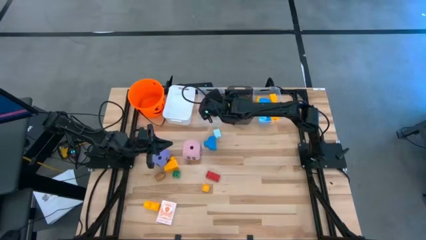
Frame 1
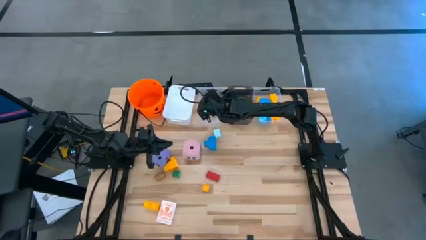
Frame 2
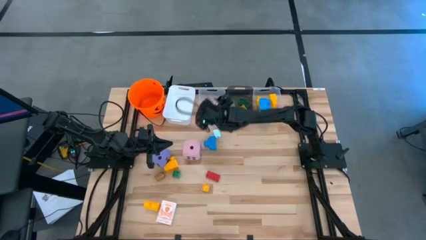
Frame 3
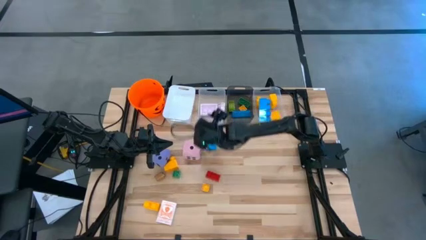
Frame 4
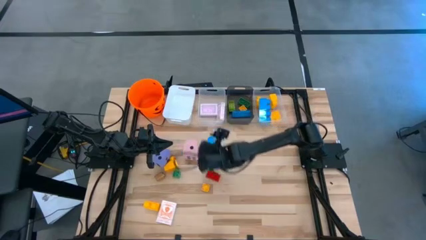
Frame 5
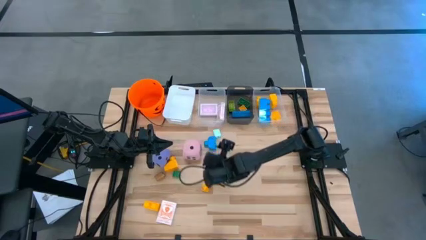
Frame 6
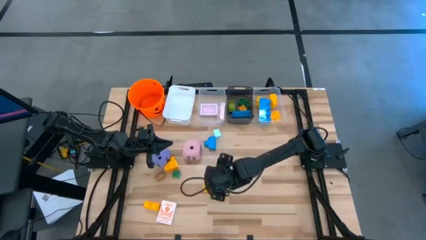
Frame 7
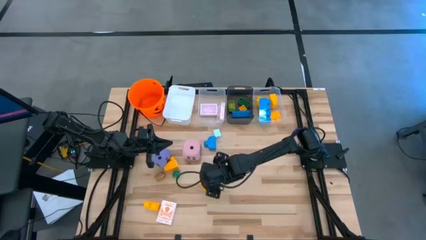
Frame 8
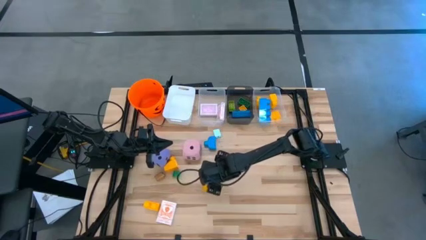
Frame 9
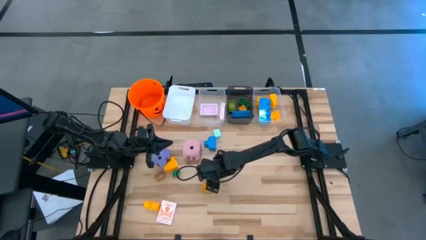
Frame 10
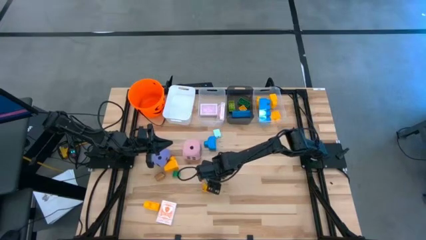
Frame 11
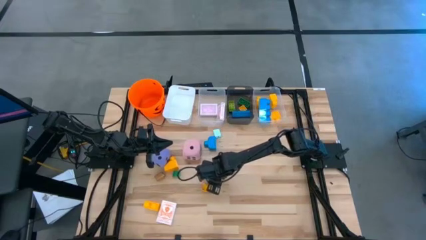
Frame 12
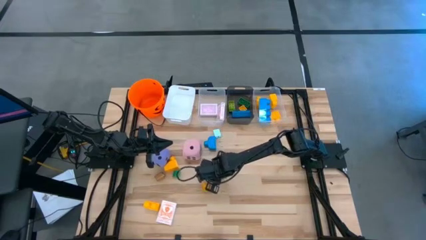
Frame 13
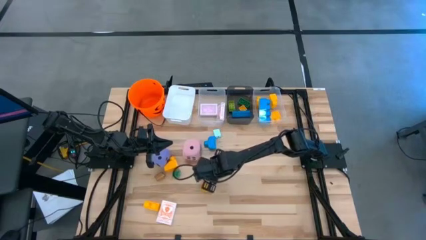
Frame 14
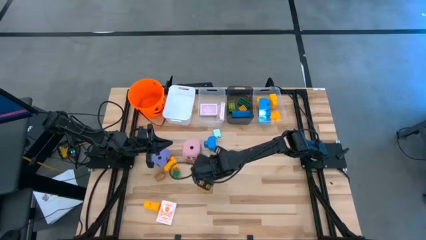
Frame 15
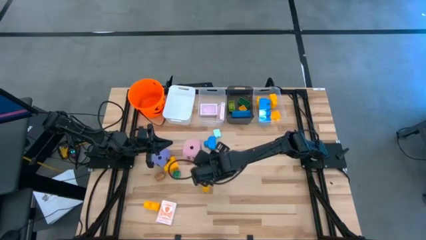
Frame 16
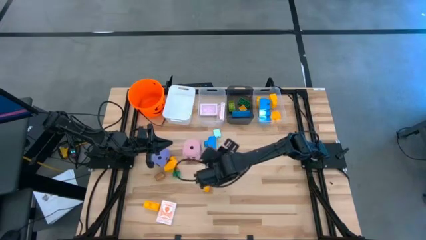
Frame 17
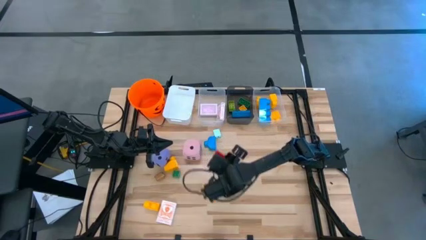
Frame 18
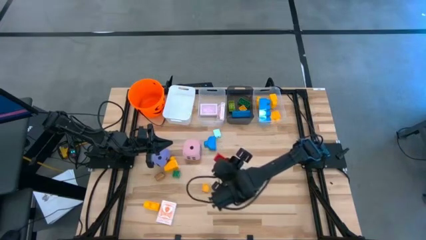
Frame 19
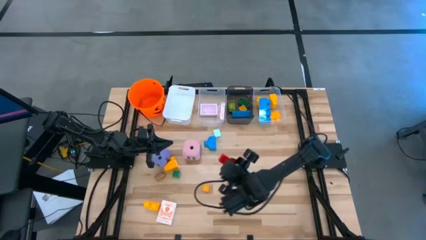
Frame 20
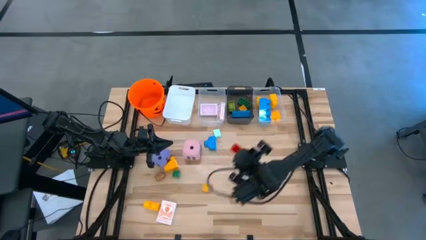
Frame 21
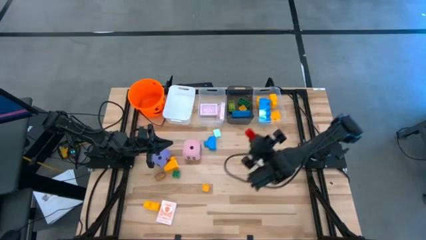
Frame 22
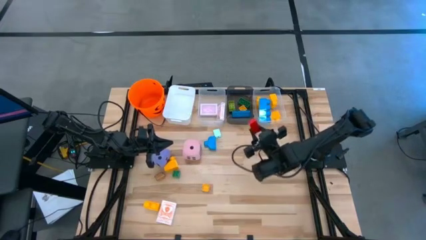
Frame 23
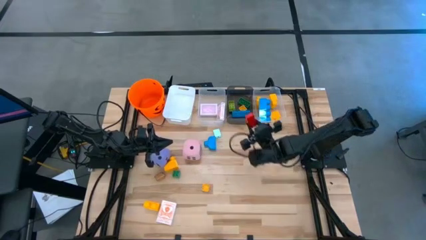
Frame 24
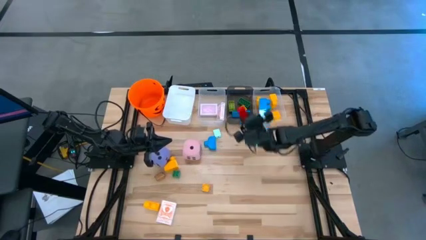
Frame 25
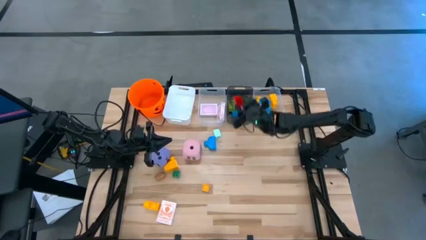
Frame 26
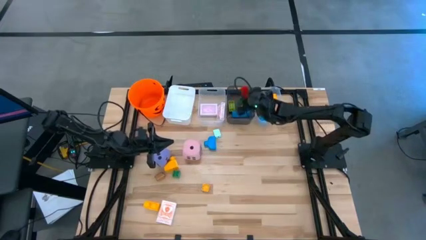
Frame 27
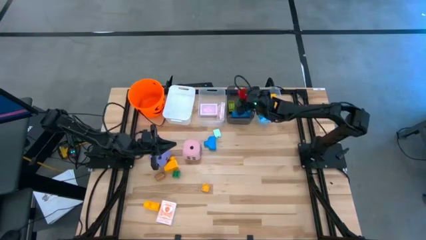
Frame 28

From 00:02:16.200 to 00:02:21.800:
Task: Pick & Place Toys
Put the small red game piece into the black bin

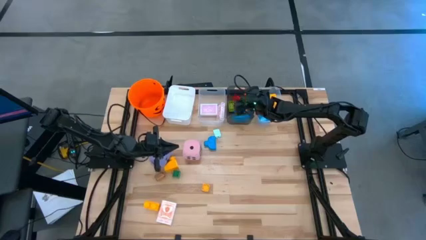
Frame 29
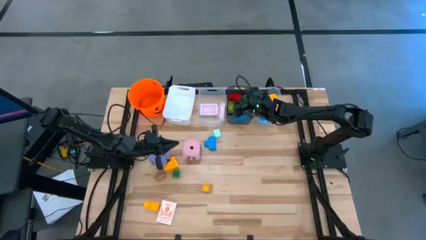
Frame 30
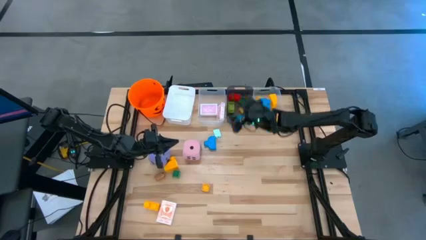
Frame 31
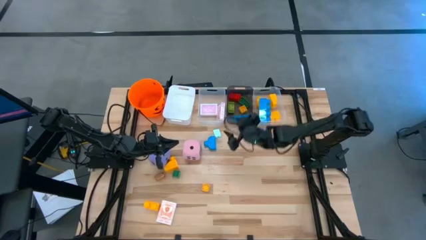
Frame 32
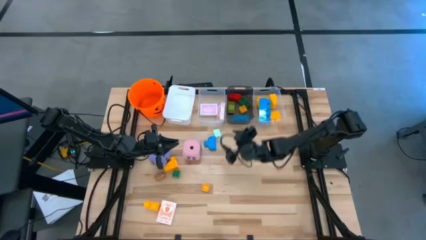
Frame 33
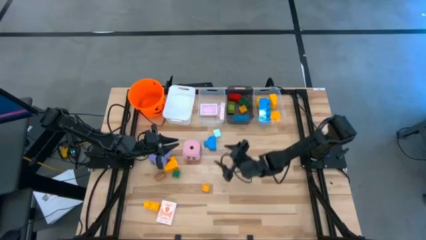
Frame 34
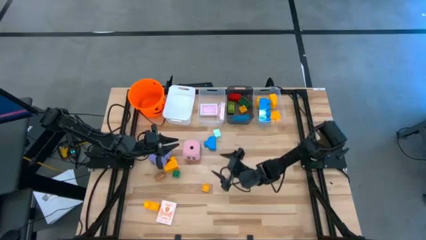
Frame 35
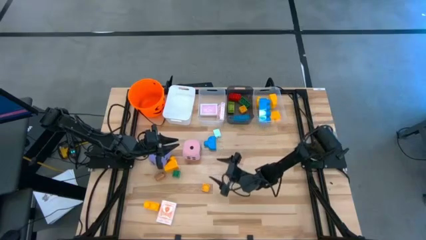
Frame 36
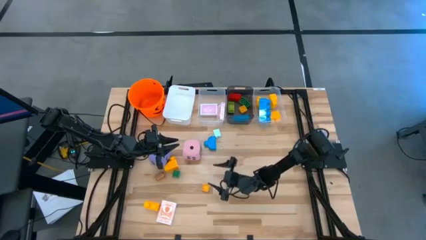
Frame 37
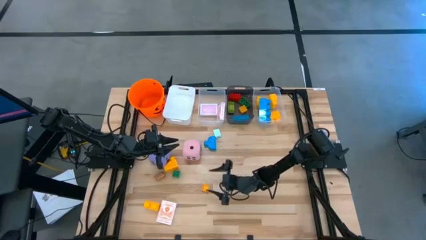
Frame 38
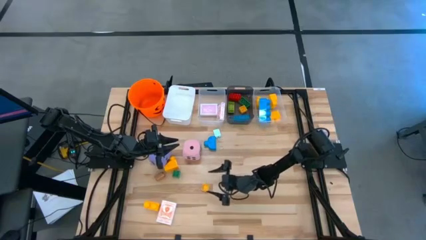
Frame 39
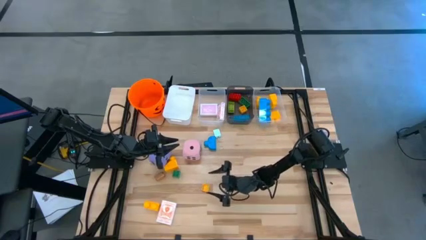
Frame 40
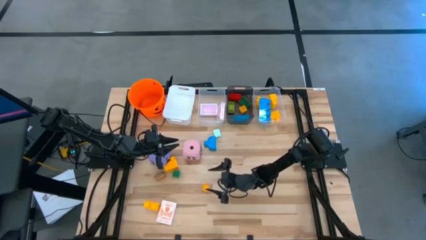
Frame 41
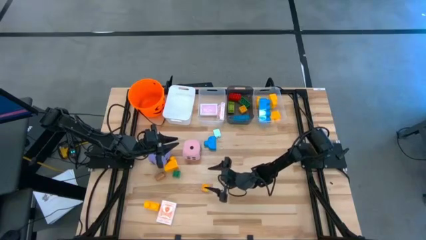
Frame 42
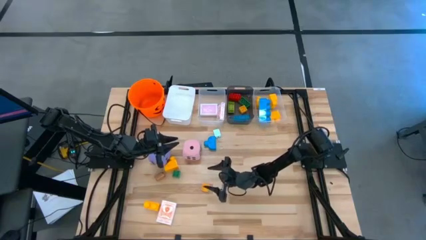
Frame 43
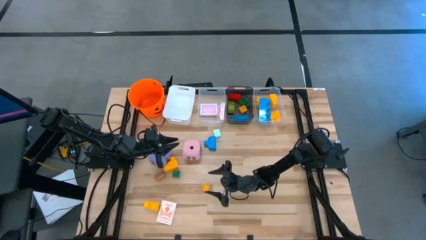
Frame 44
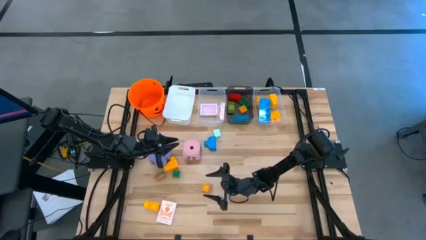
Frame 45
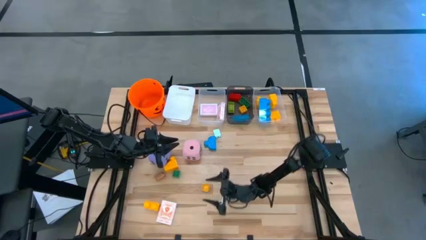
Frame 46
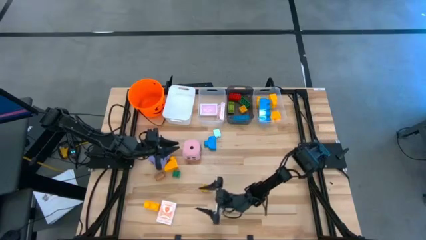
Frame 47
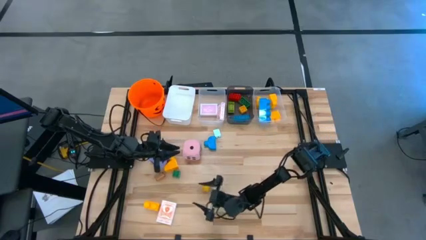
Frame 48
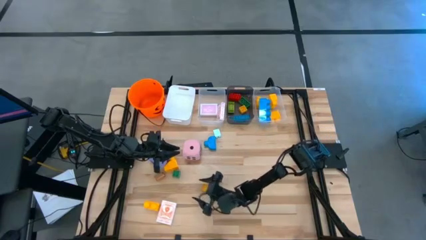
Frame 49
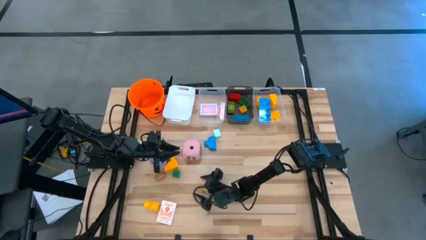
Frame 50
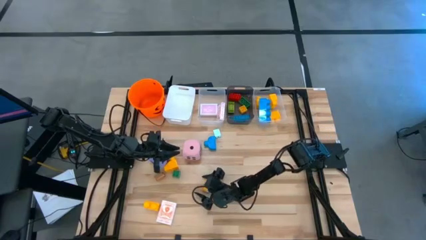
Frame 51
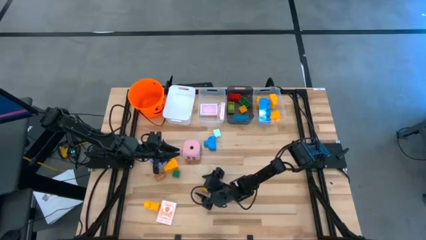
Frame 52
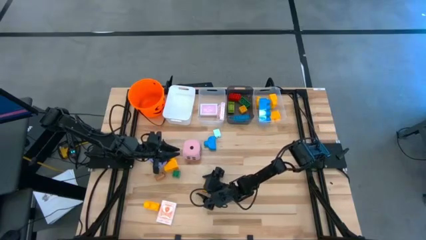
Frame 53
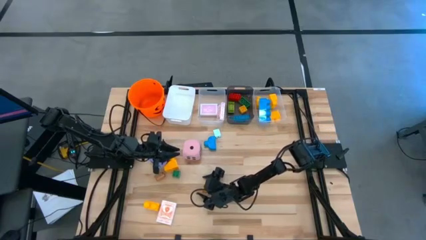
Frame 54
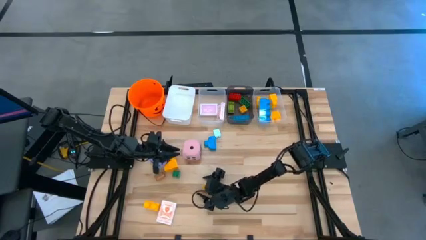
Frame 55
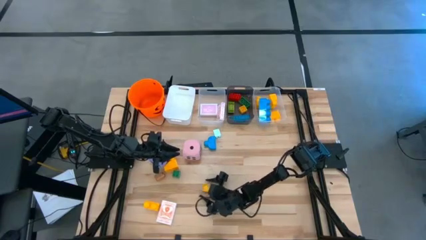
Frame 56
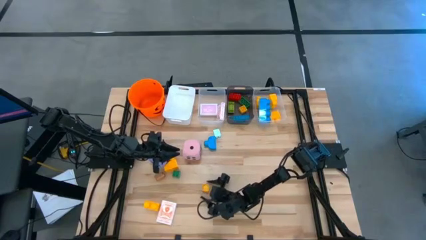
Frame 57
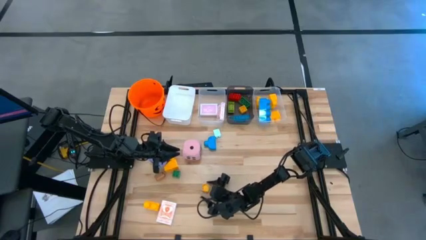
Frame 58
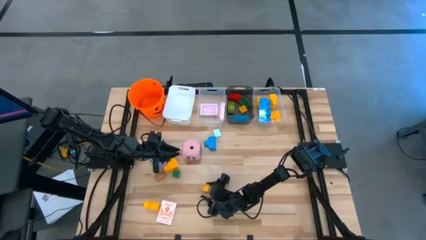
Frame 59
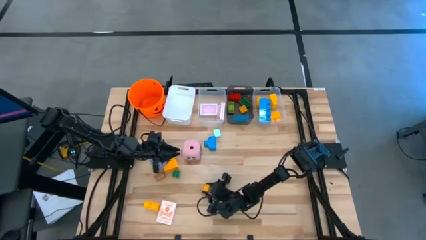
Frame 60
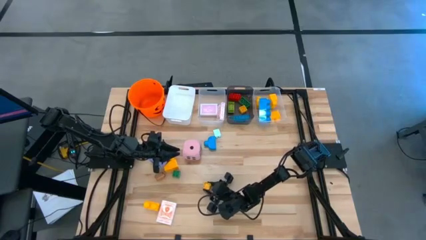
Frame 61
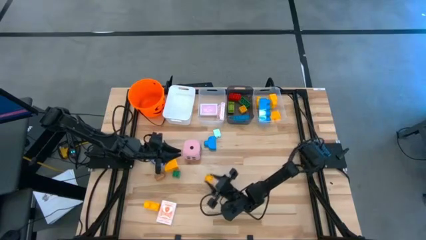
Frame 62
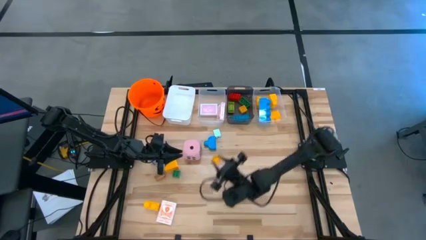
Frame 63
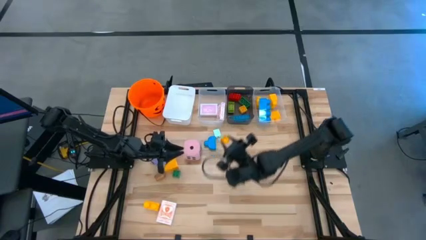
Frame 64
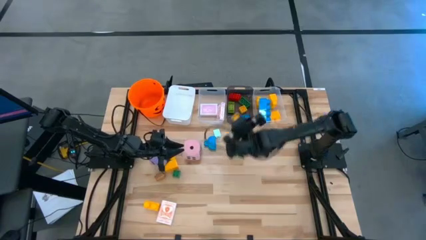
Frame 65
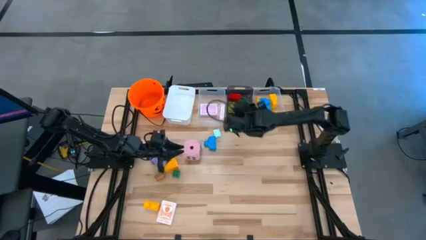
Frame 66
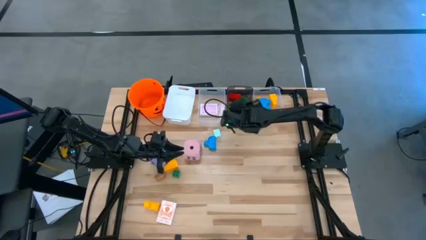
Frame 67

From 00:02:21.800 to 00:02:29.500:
Put the small yellow game piece into the black bin
